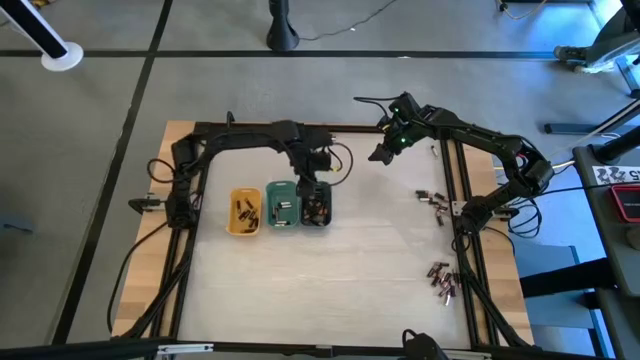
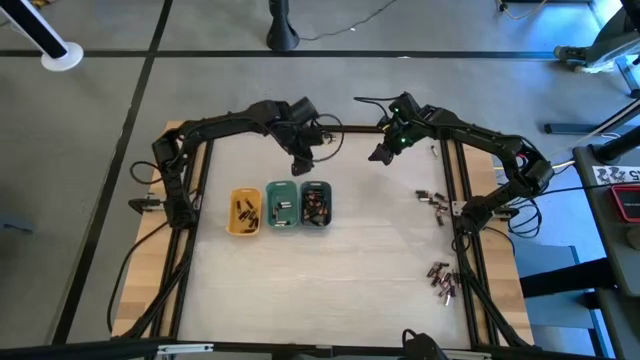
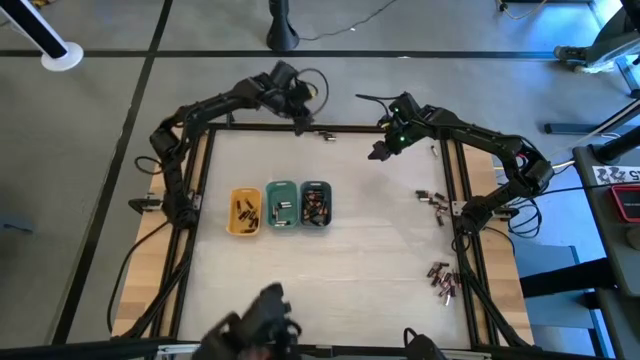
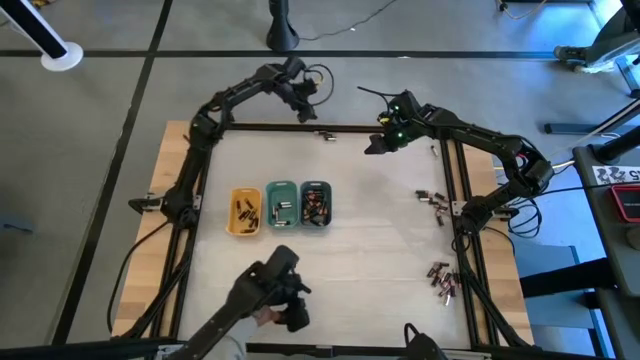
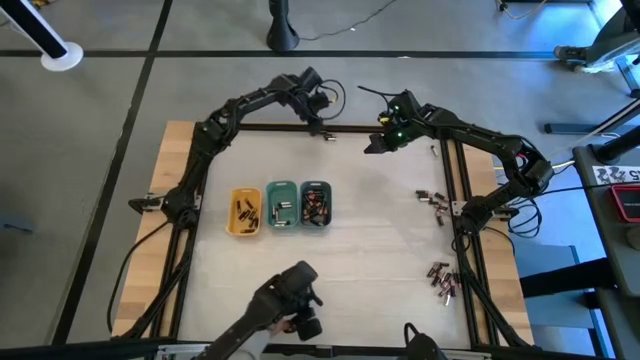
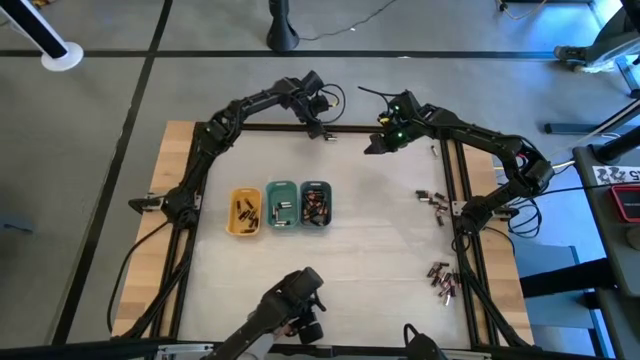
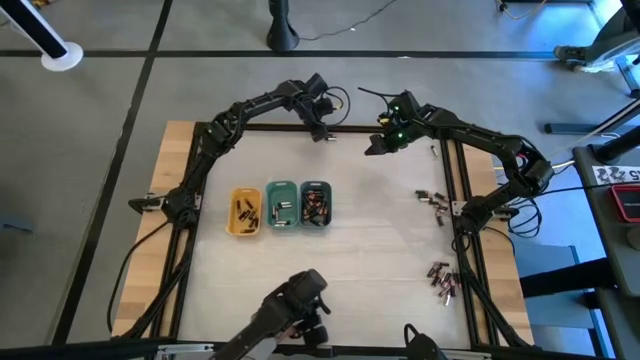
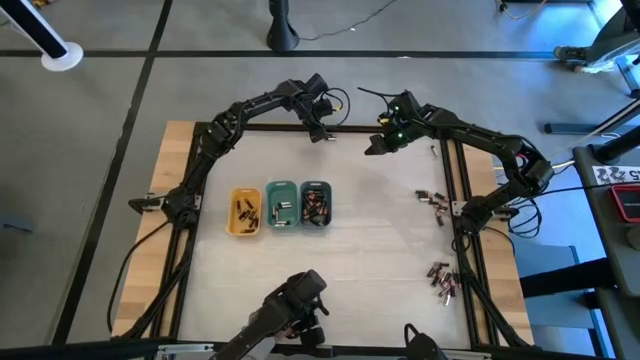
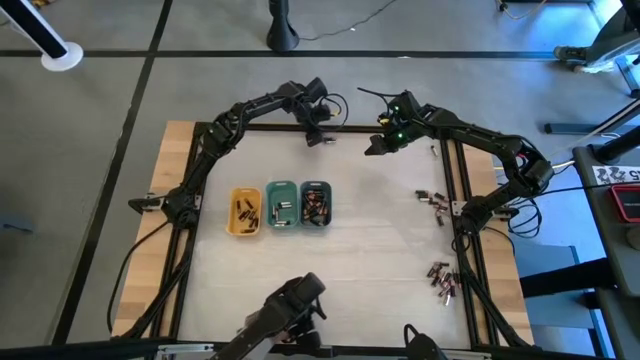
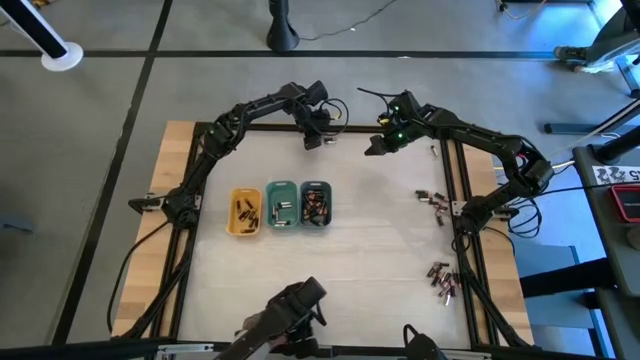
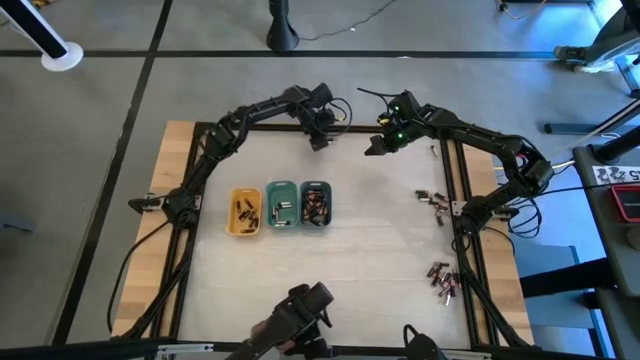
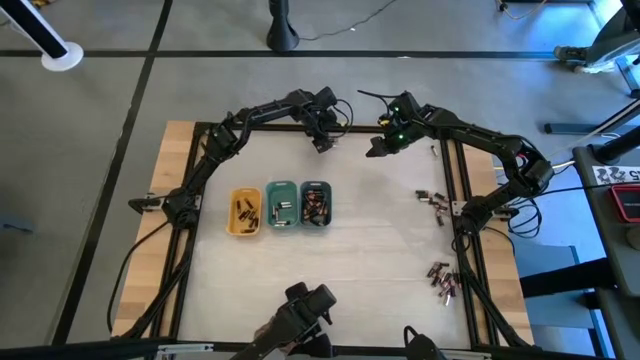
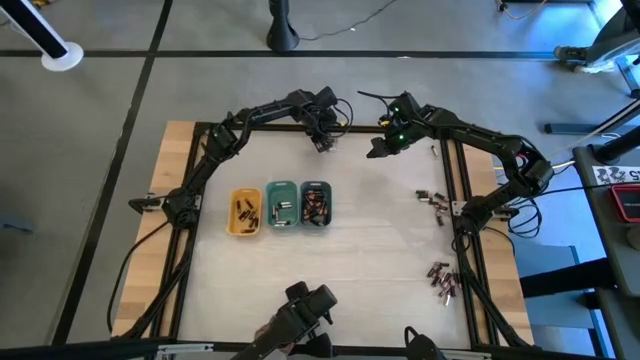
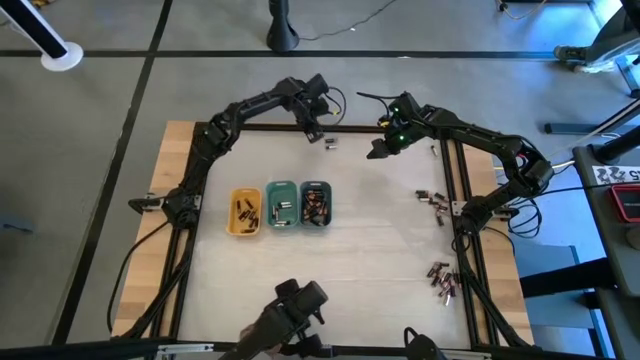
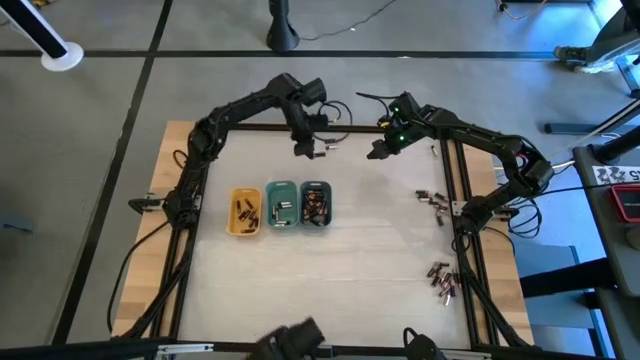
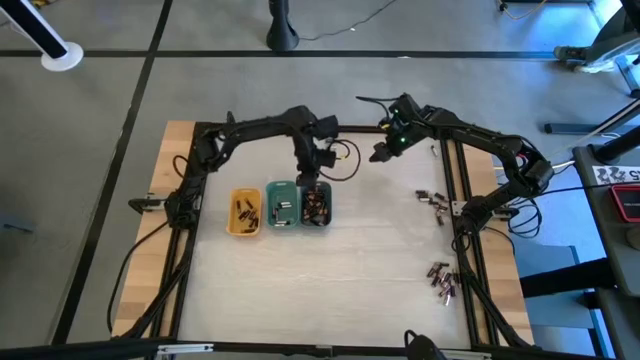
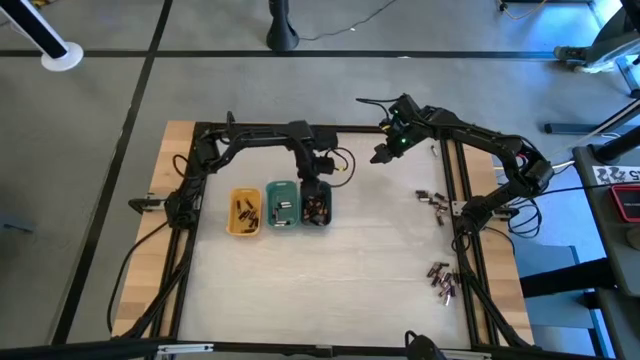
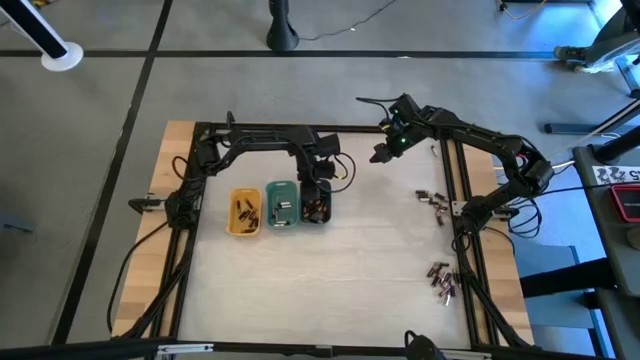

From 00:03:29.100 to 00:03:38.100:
Task: Sort batteries
Put the large black battery into the blue bin

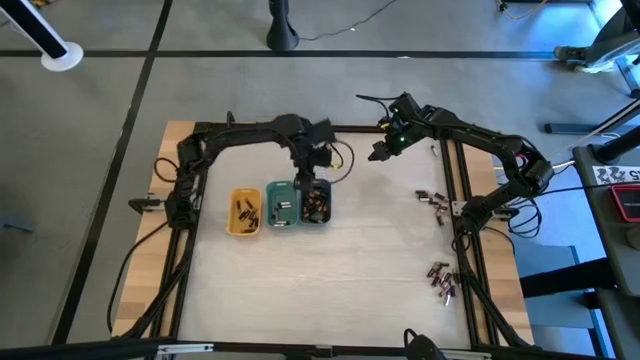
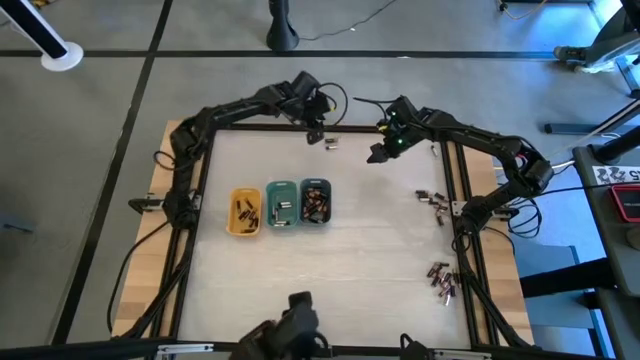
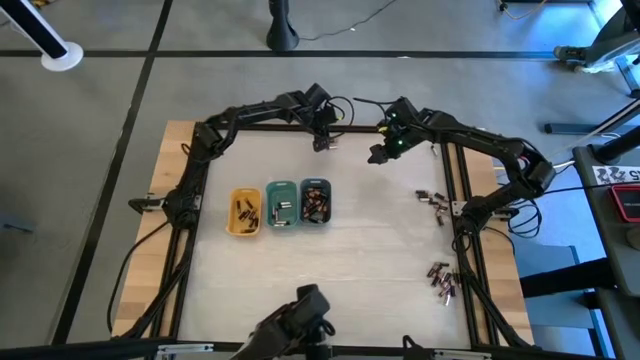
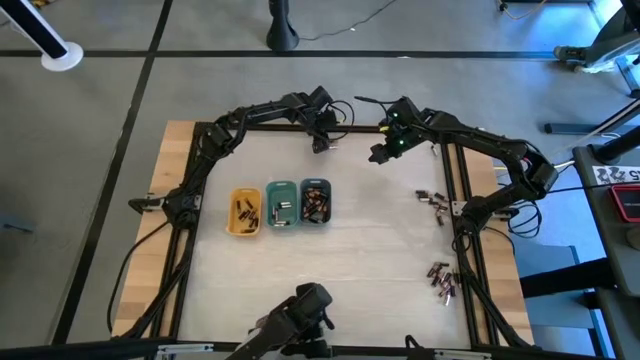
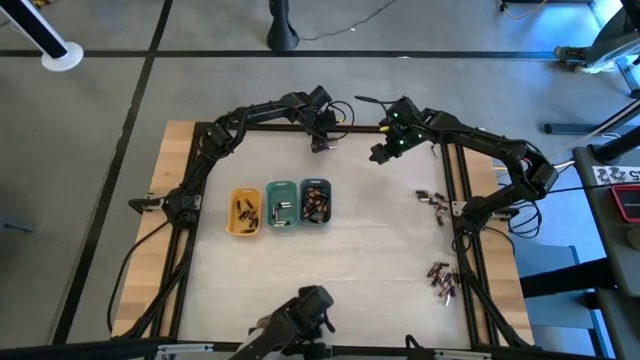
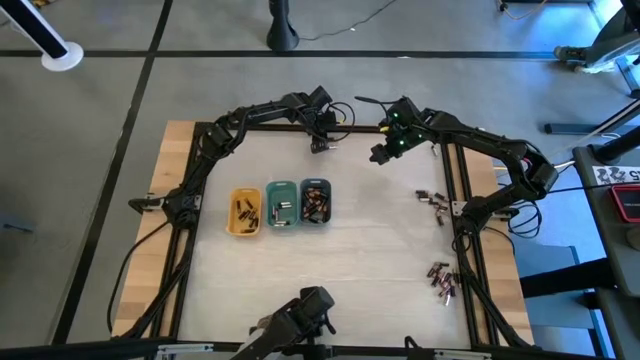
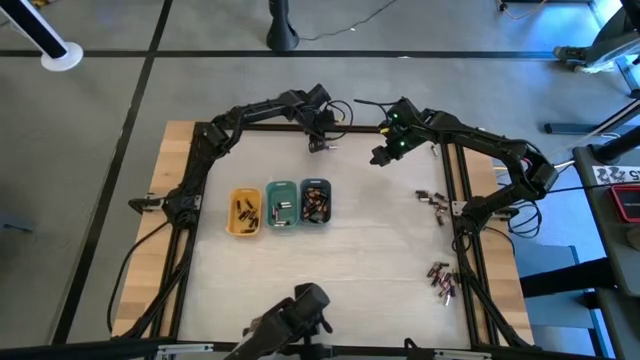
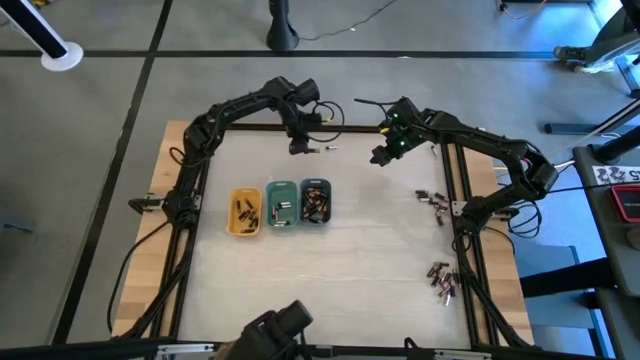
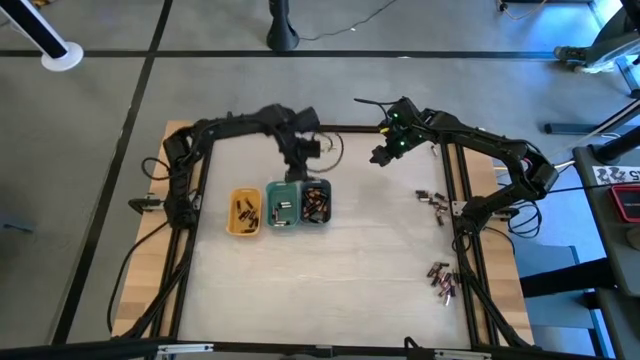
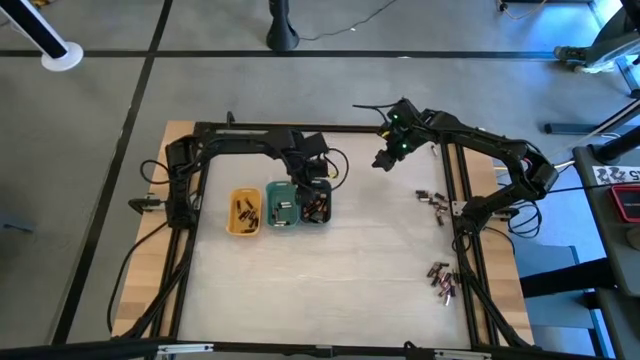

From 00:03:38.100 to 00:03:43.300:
Put the large black battery into the blue bin

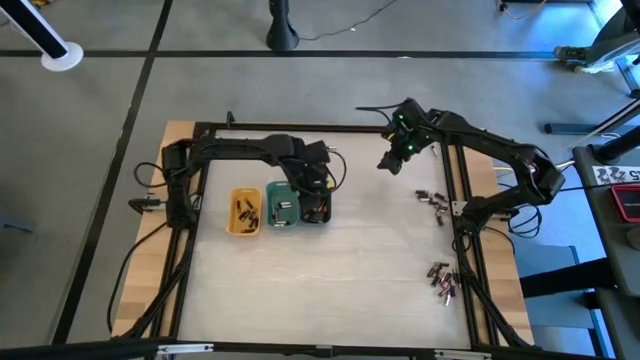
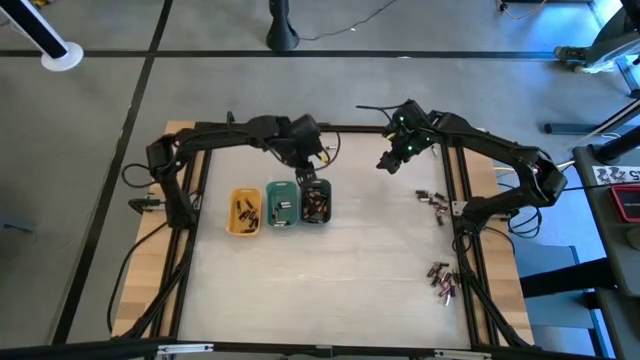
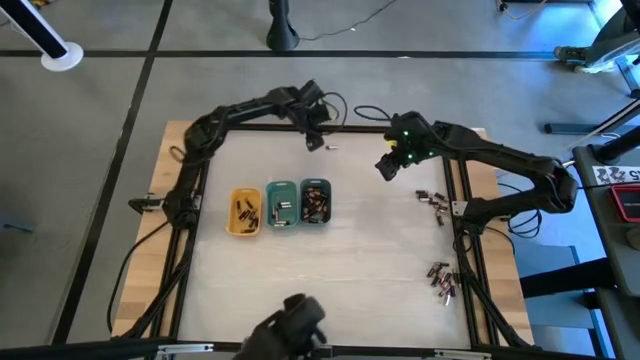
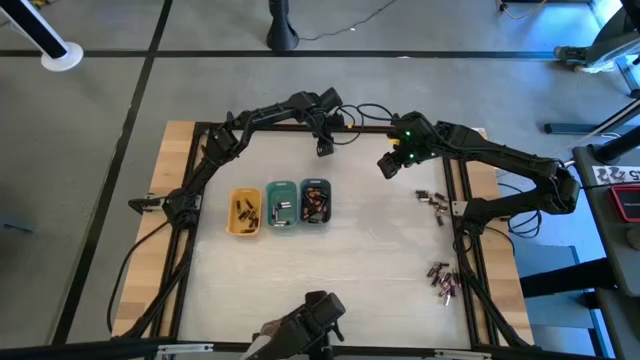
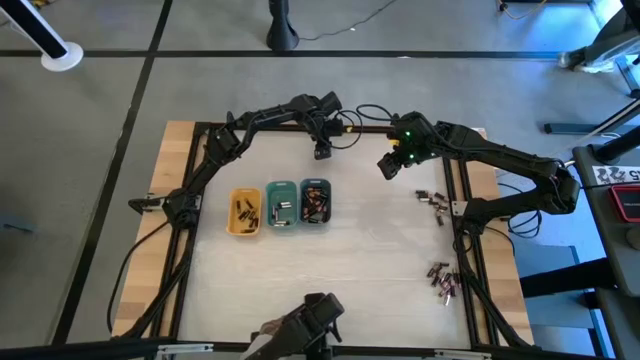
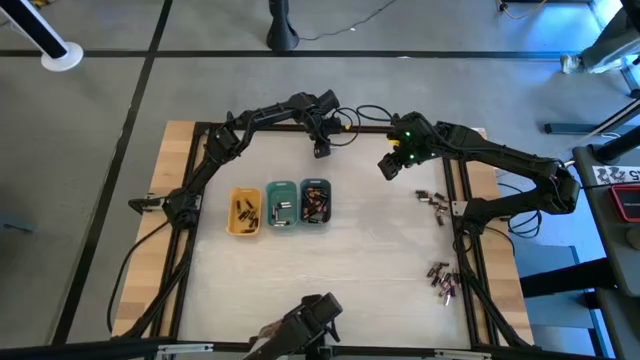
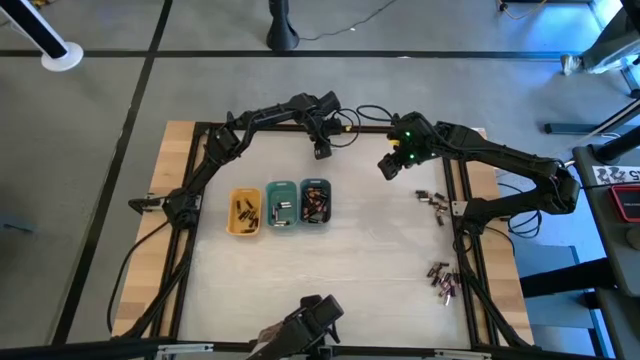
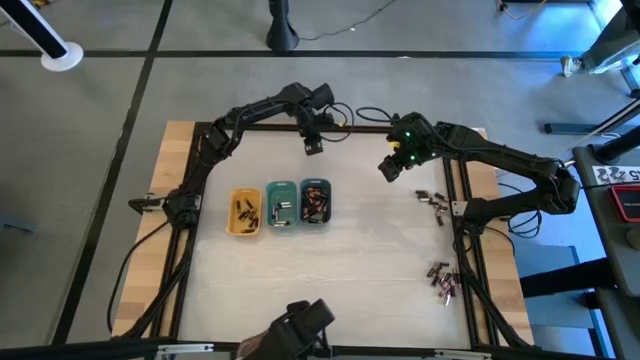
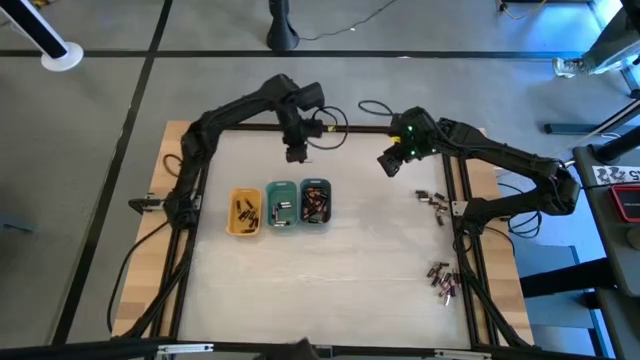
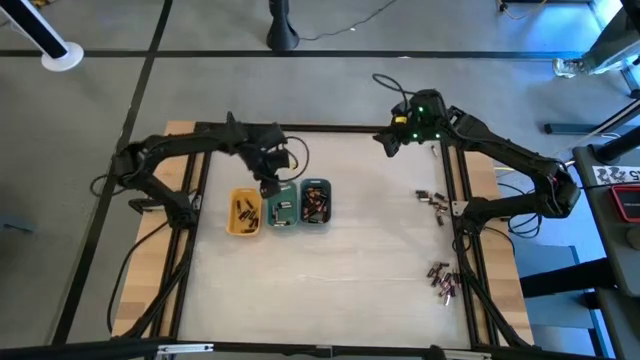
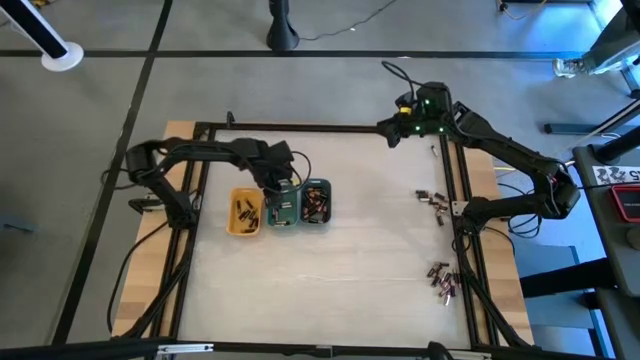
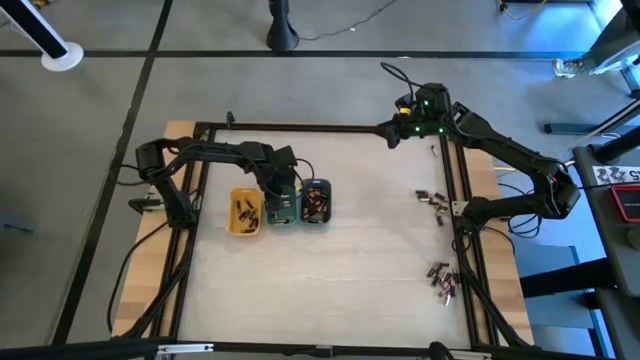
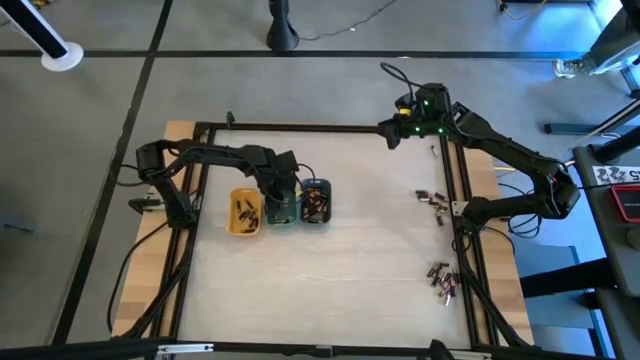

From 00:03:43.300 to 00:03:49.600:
Put the silver battery into the green bin

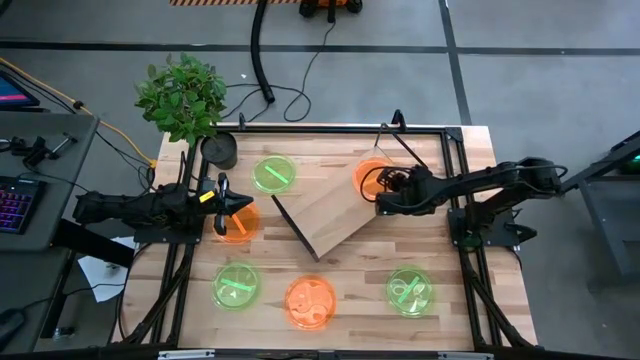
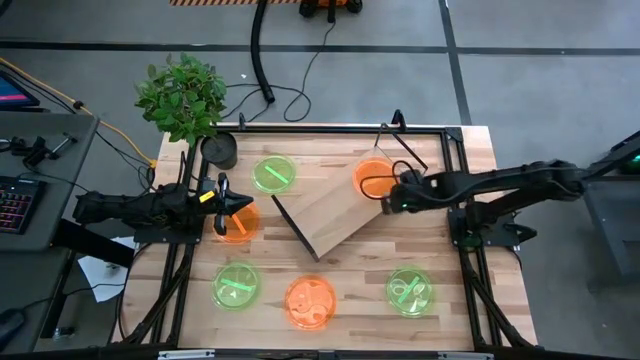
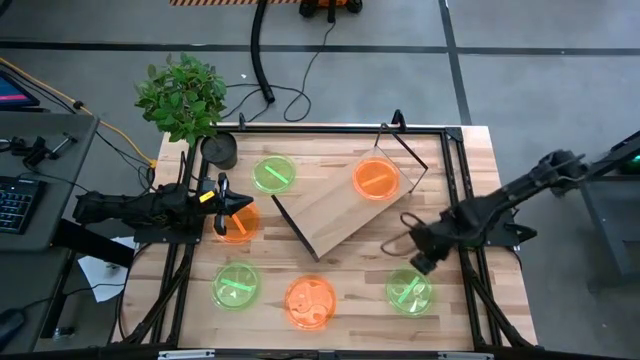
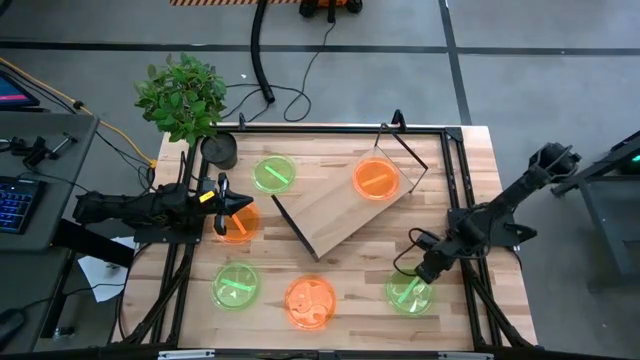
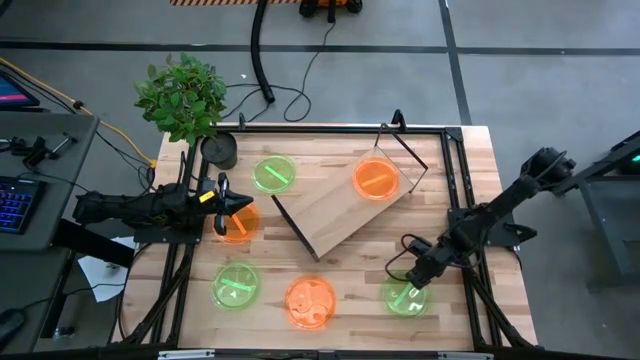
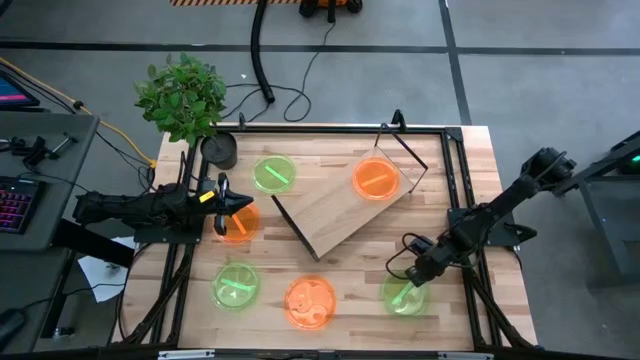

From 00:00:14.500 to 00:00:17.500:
Task: Place and stack plates onto a shelf
Put the bottom right green plate on the shelf
